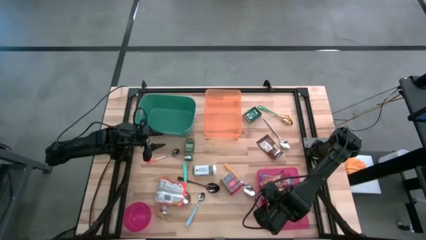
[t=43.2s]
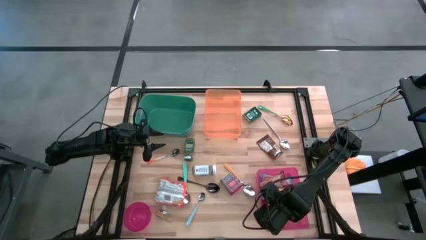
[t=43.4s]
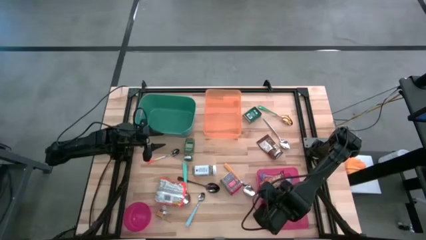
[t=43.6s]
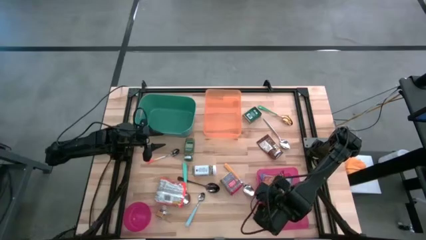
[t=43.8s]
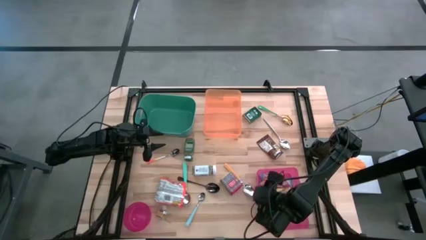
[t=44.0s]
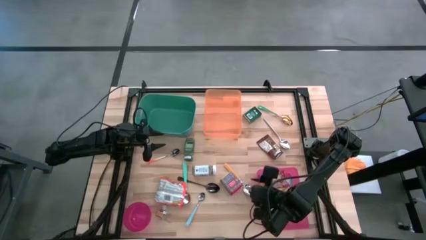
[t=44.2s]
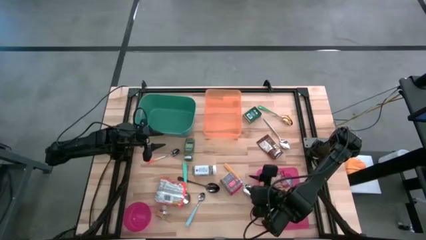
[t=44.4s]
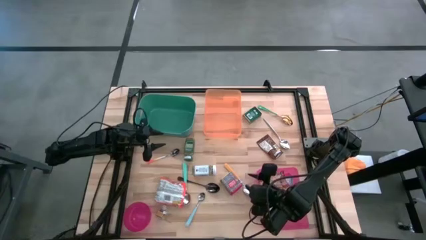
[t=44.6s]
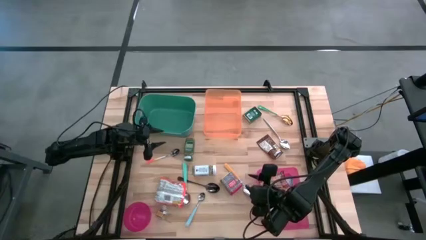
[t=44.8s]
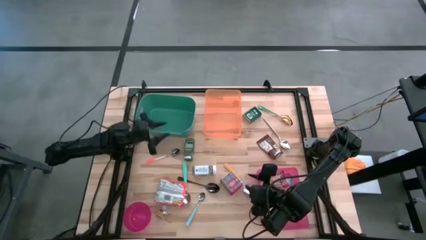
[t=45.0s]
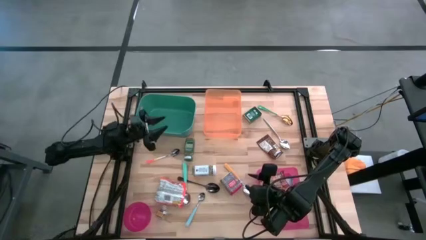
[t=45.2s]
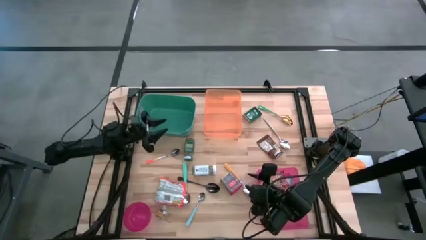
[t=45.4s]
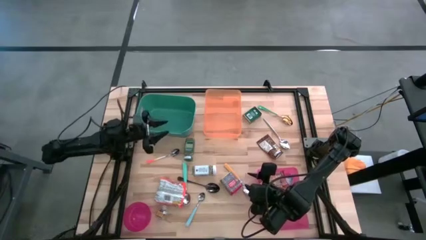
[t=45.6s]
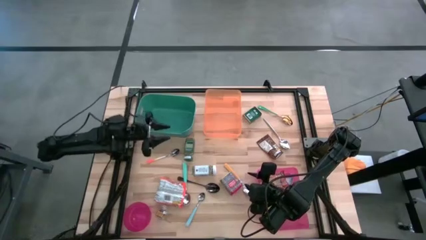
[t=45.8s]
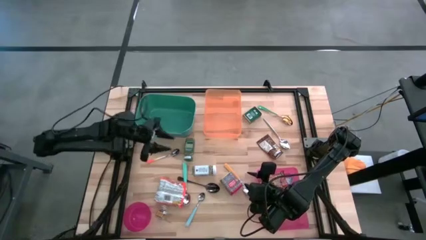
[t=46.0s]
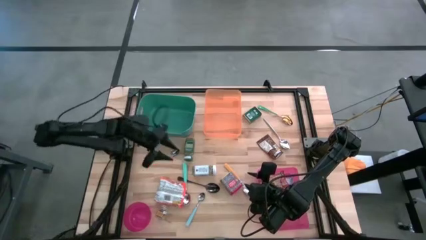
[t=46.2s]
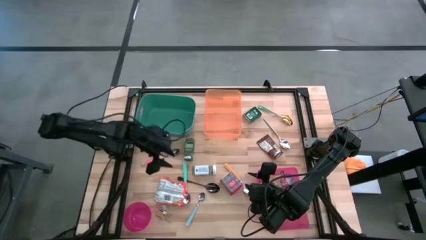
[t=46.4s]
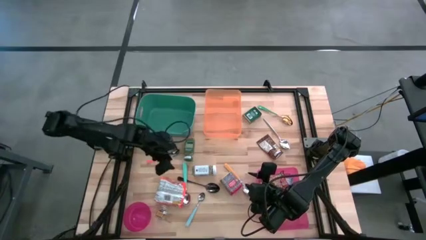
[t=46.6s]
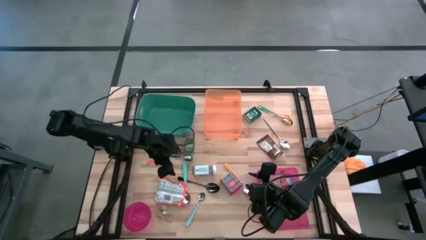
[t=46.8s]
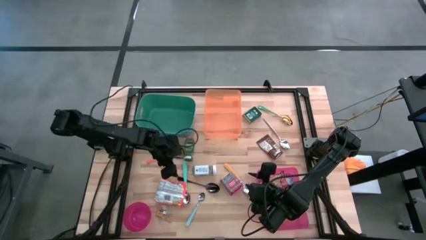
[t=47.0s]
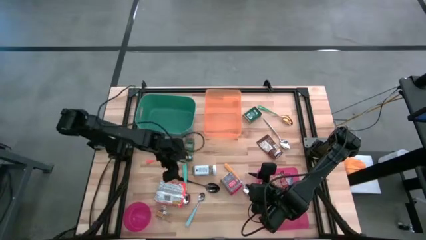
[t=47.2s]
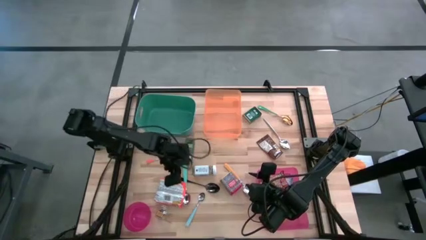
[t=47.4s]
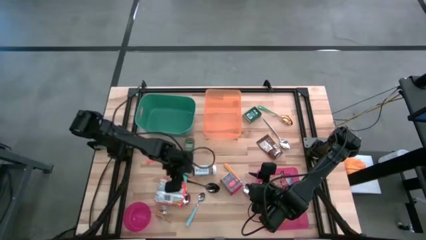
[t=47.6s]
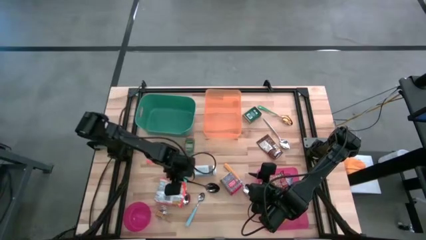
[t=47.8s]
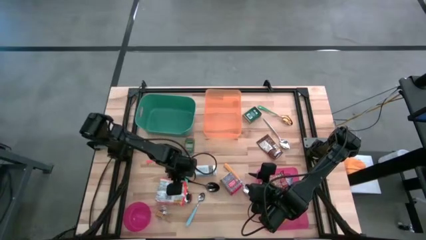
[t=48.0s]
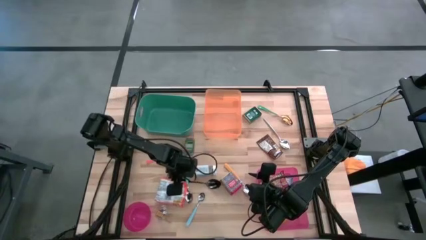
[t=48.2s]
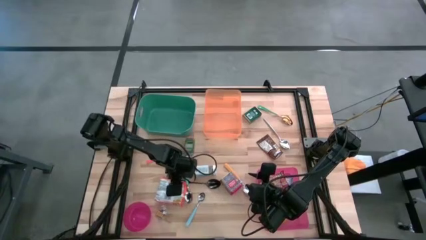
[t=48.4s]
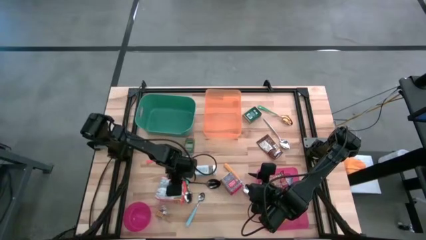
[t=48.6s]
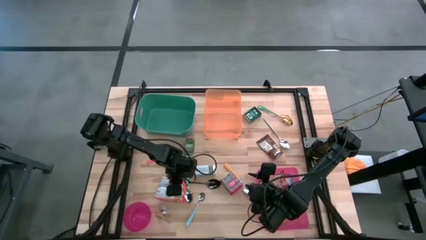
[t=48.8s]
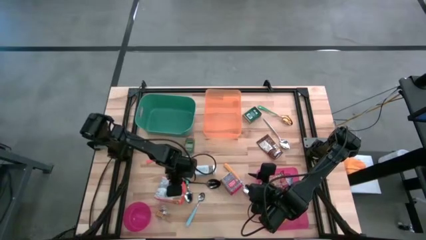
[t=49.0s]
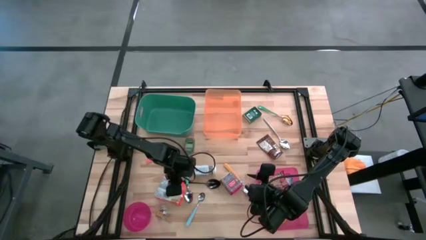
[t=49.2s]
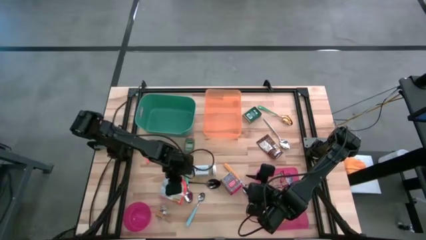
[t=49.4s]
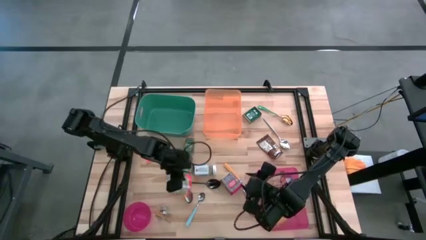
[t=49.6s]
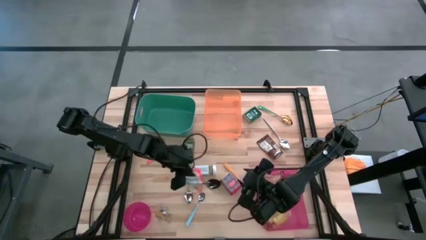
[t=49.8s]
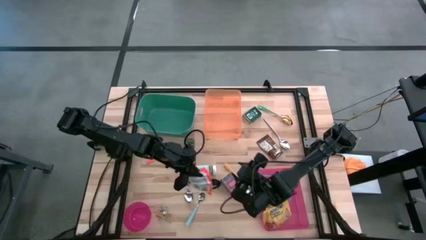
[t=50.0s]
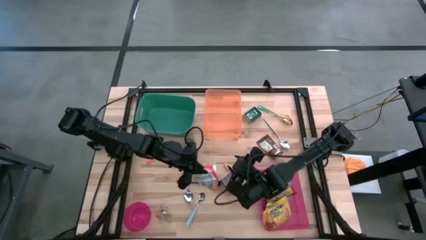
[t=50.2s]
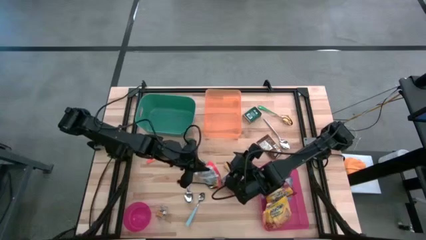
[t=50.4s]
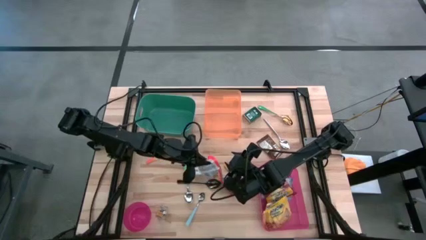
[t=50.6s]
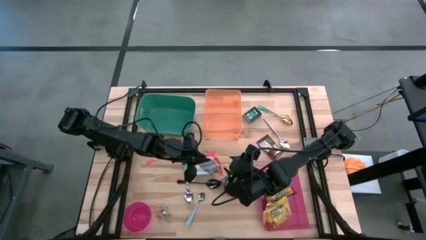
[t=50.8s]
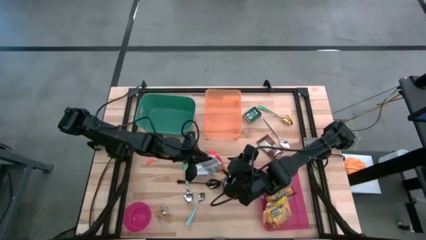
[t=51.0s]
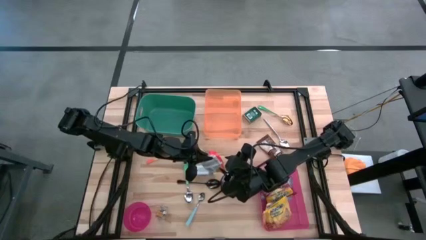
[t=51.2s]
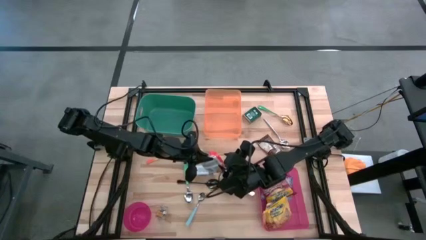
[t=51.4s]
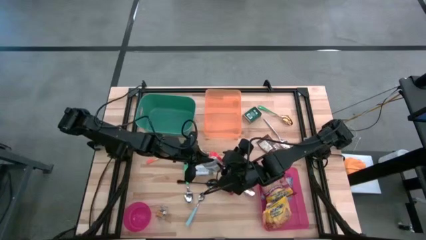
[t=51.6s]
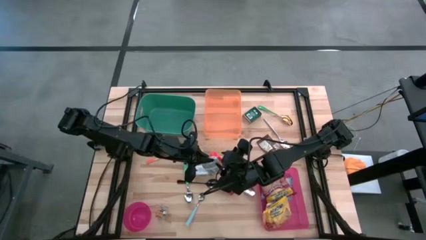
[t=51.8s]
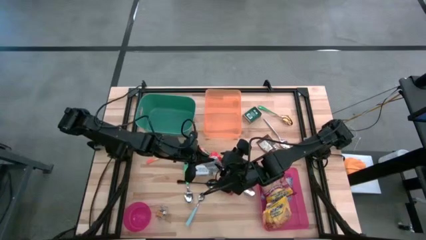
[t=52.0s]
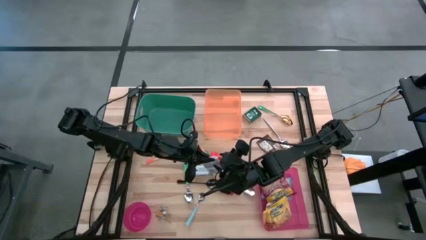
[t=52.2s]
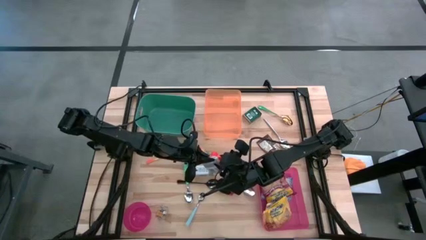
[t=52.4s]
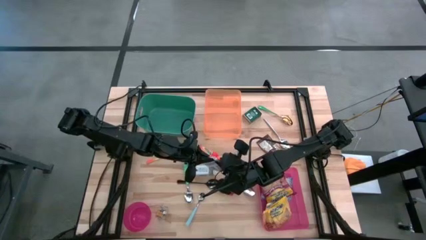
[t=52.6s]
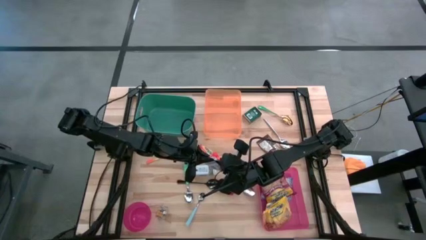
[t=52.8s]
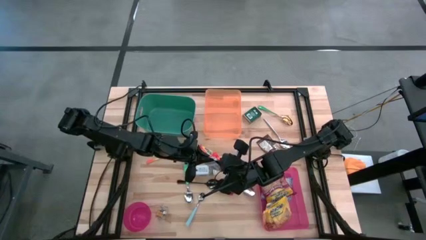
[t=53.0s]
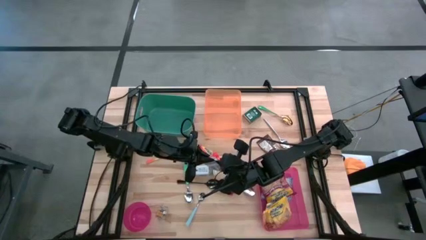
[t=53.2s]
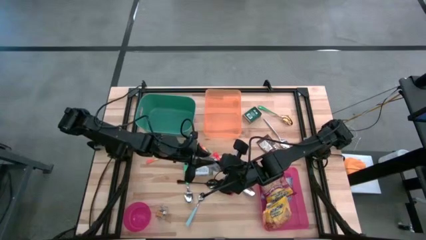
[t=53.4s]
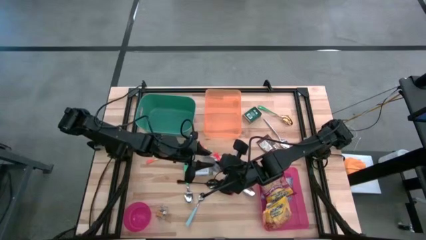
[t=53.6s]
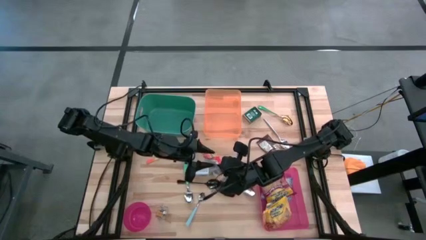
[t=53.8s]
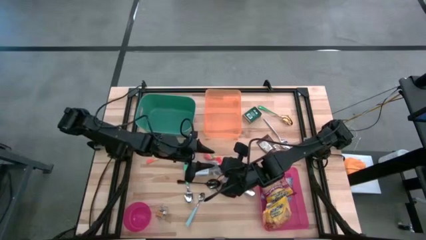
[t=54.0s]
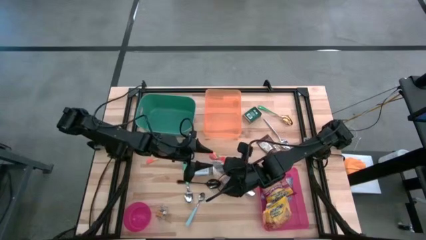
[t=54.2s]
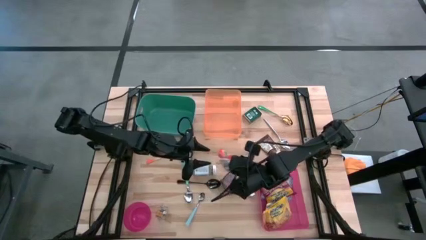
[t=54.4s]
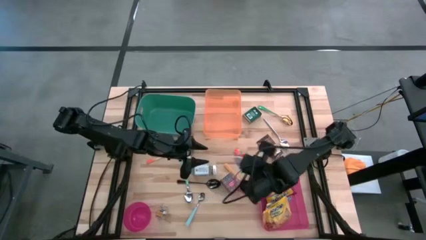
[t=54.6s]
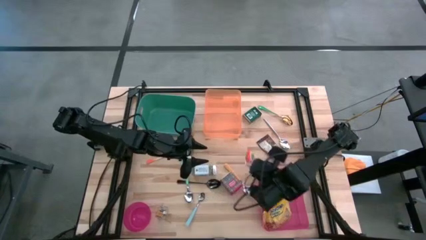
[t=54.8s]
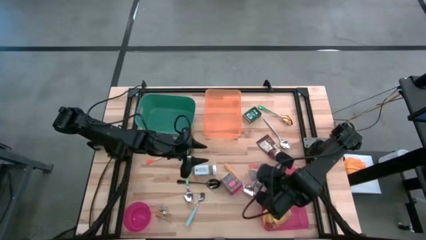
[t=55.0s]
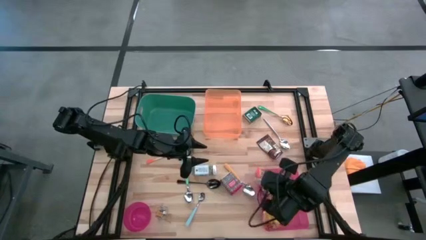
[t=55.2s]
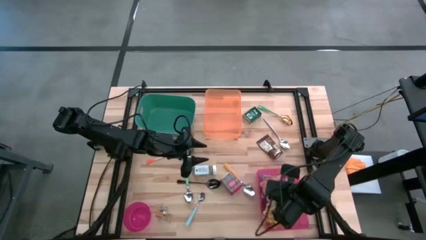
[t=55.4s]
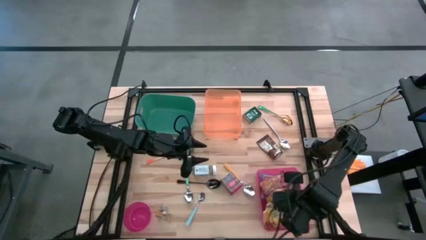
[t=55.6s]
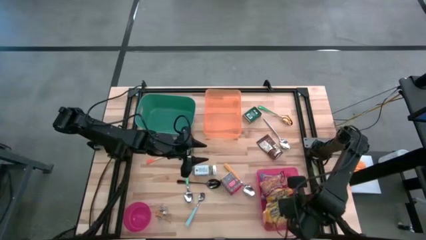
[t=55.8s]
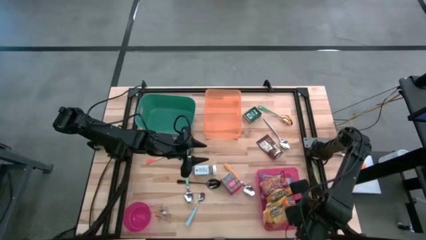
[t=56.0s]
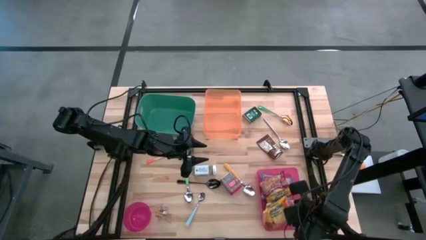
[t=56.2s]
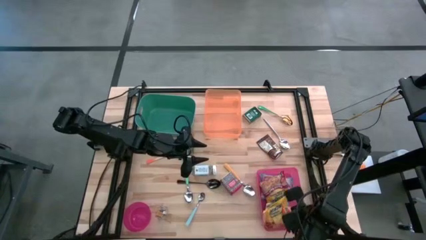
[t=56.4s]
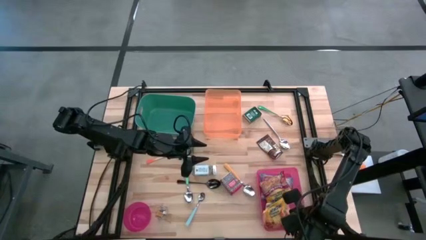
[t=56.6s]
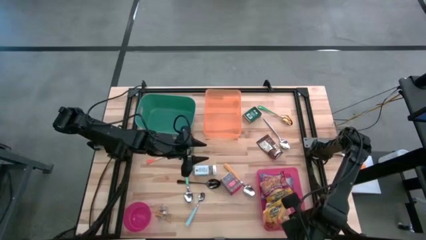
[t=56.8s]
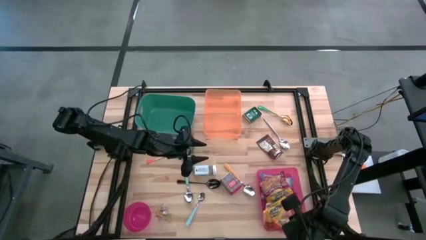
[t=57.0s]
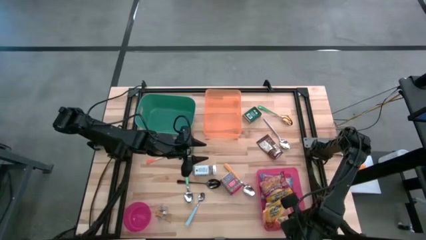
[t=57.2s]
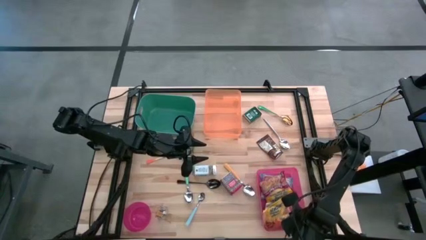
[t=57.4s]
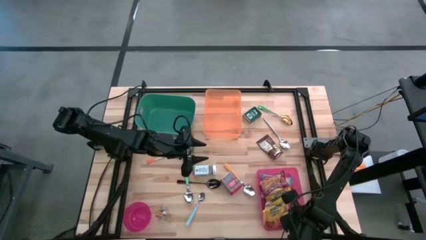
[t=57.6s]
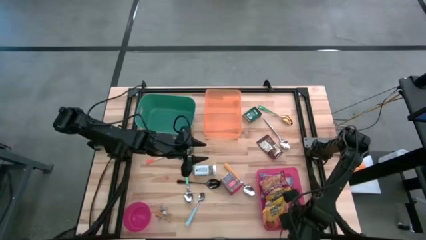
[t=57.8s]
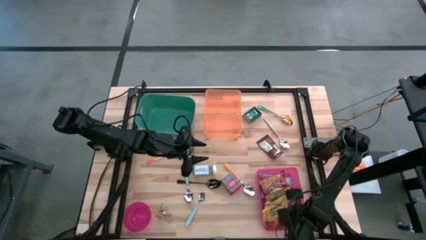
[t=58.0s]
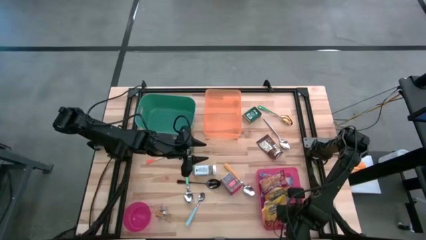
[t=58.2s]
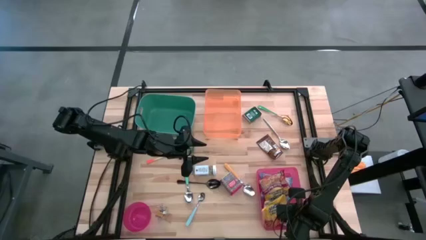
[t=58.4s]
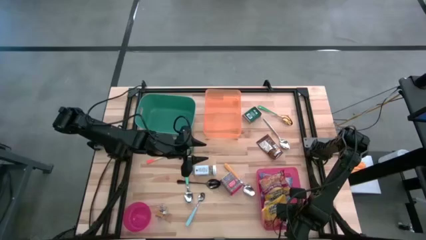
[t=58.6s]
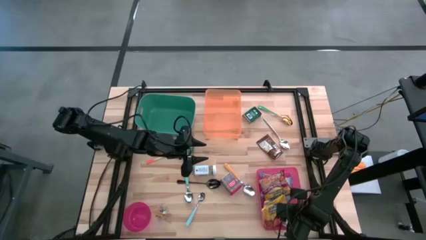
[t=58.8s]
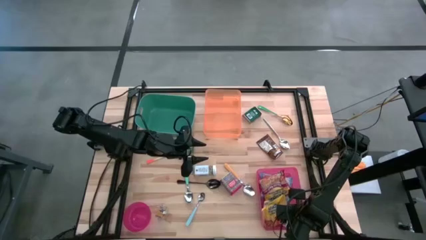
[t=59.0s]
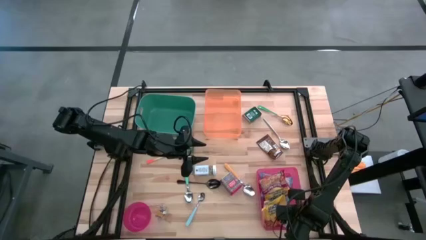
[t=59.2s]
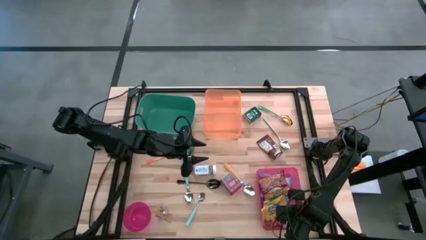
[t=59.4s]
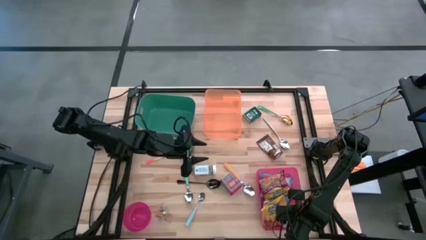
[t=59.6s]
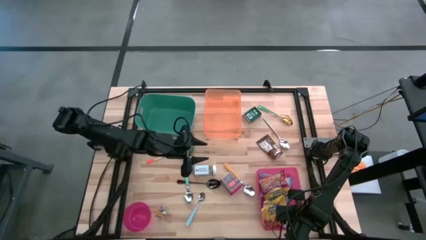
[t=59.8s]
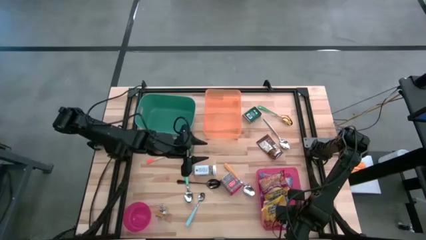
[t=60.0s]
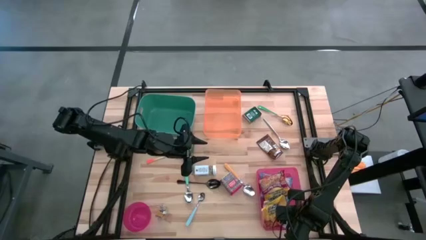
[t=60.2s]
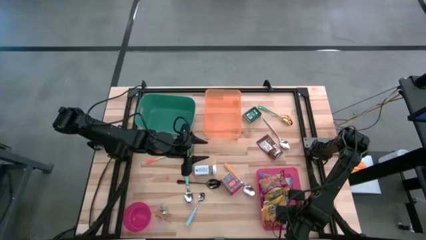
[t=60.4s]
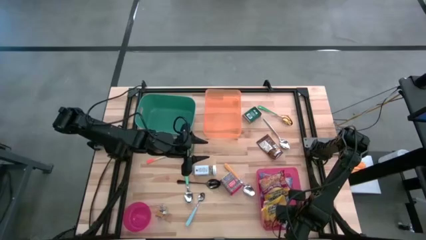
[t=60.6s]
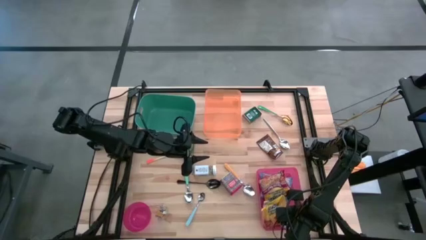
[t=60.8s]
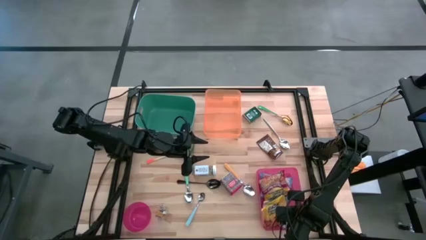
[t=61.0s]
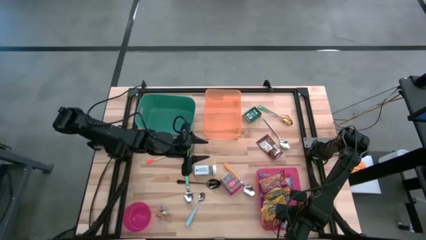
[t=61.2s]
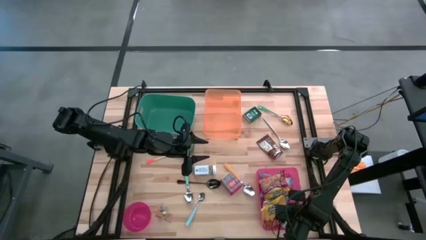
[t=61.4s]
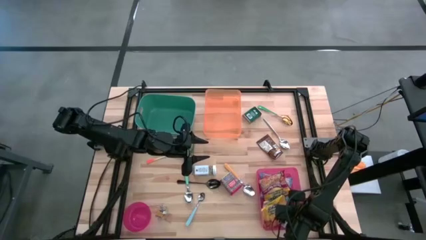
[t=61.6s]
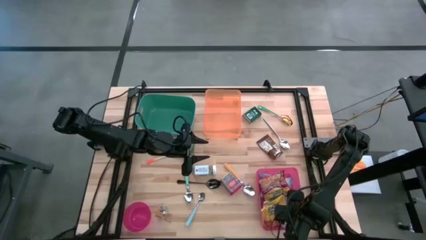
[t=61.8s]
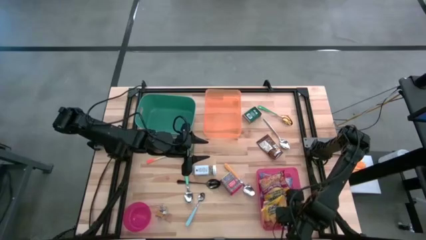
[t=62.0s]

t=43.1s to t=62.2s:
Put the orange noodle pack into the pink bin
